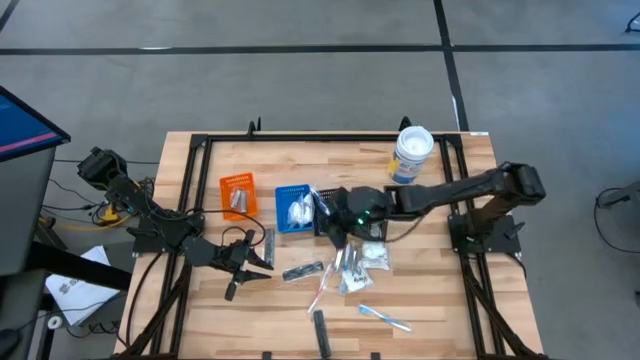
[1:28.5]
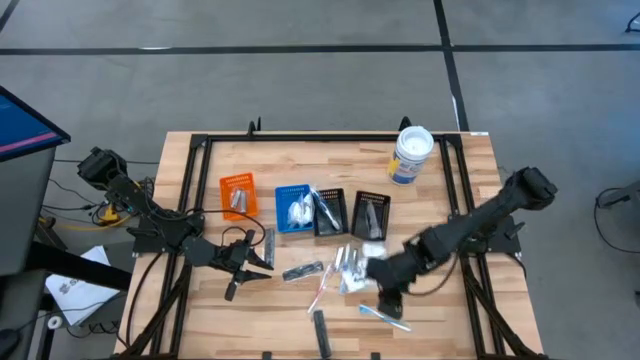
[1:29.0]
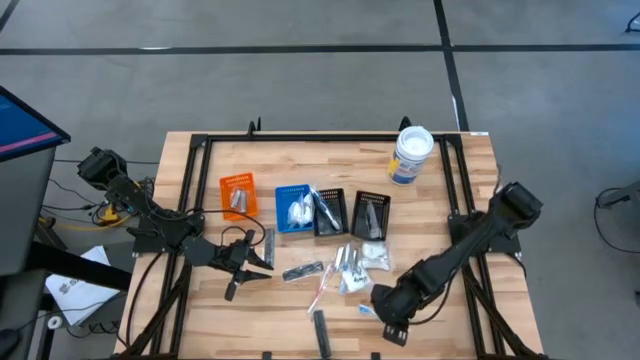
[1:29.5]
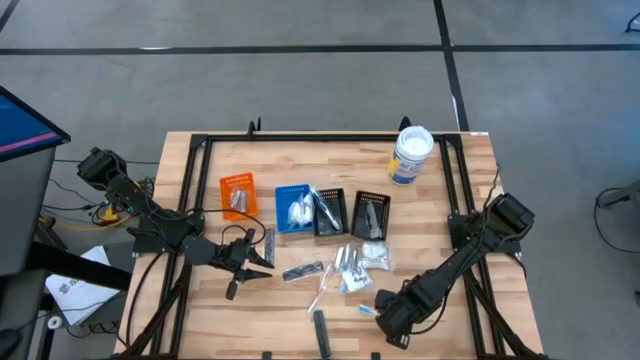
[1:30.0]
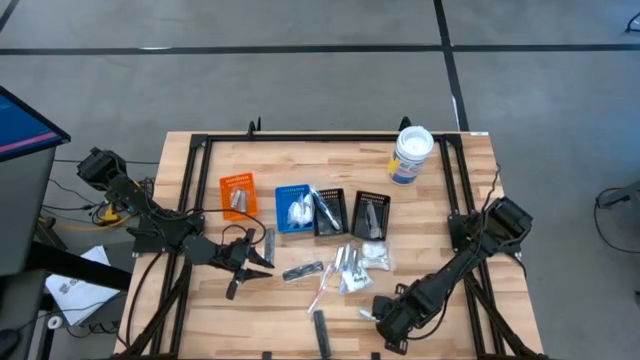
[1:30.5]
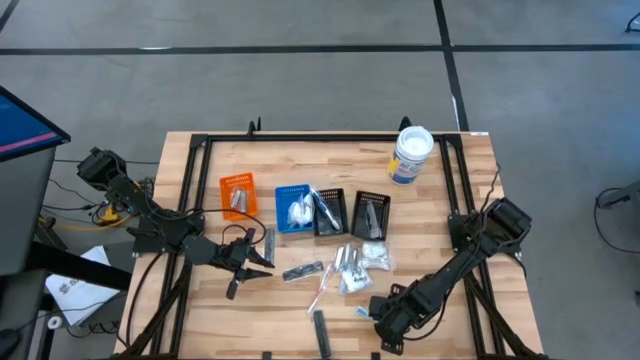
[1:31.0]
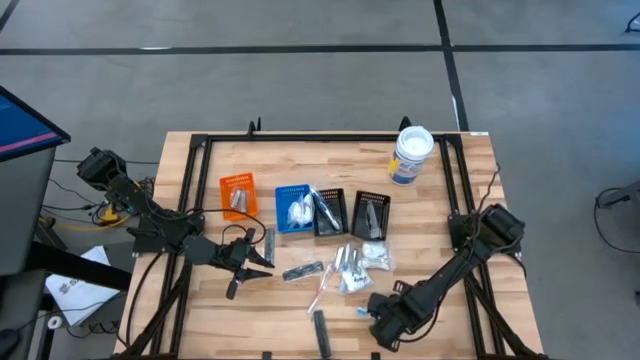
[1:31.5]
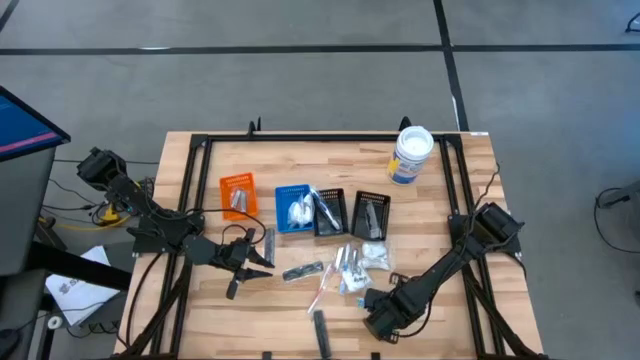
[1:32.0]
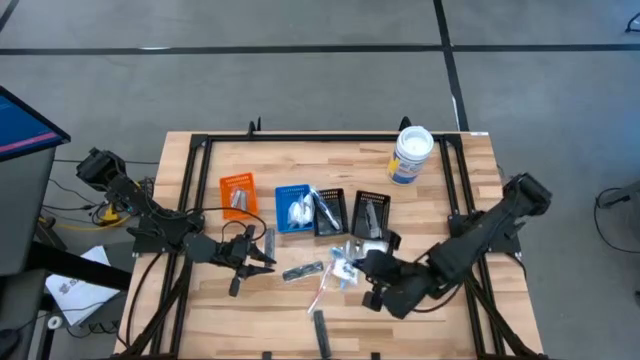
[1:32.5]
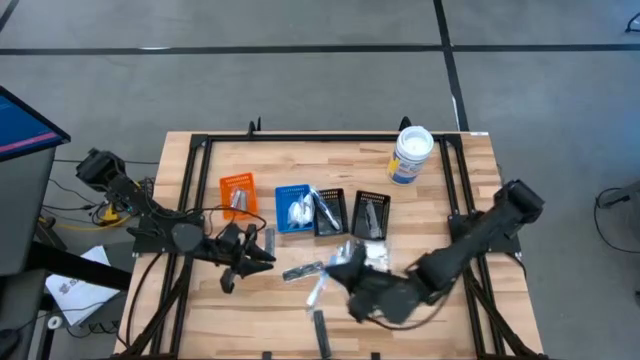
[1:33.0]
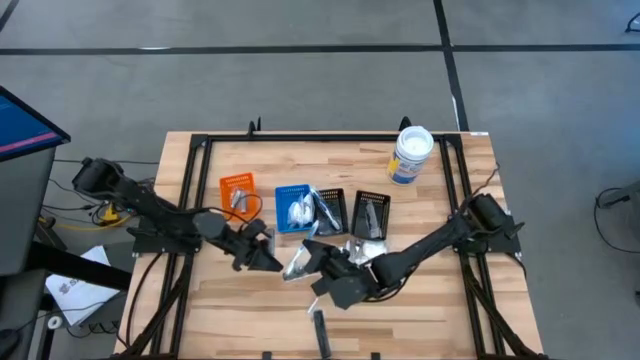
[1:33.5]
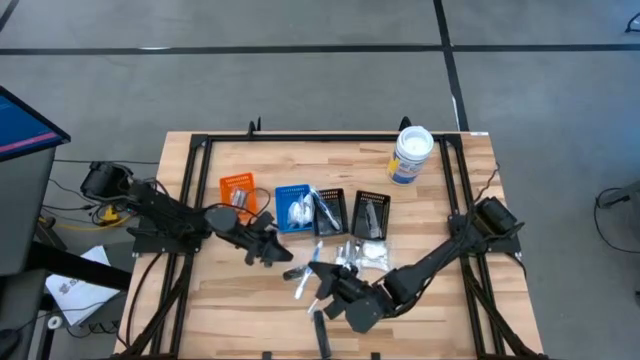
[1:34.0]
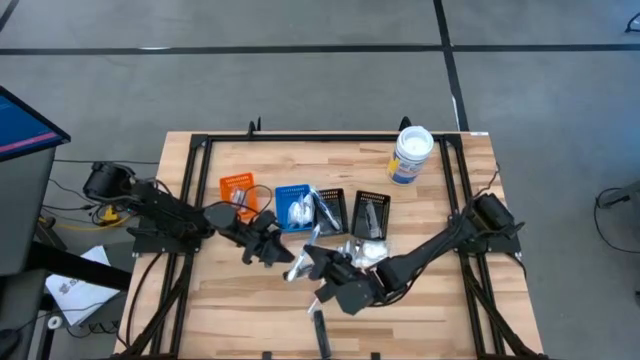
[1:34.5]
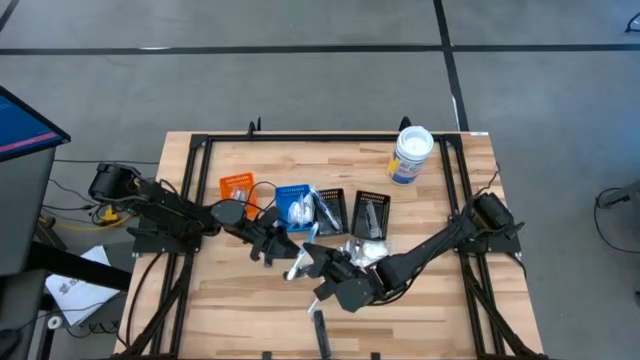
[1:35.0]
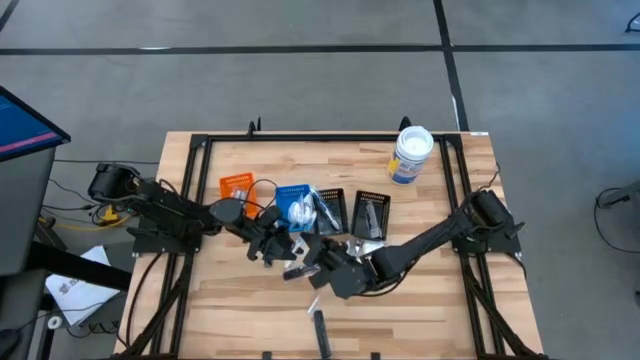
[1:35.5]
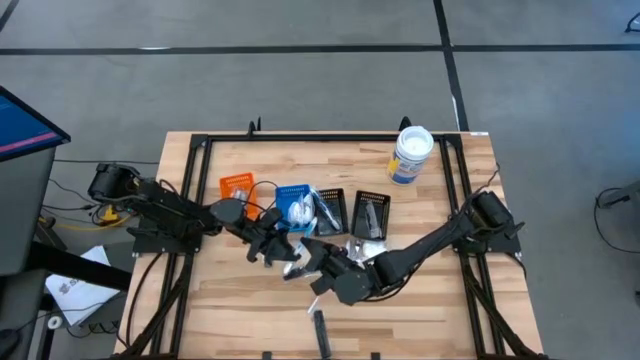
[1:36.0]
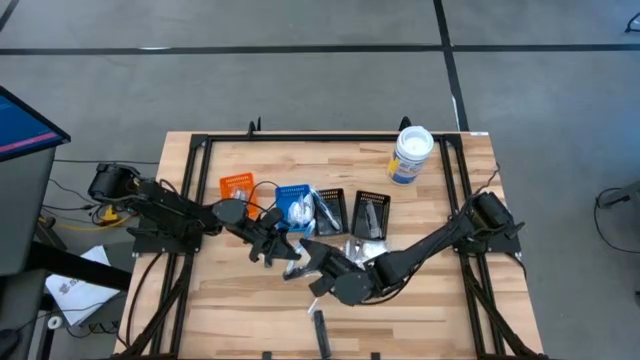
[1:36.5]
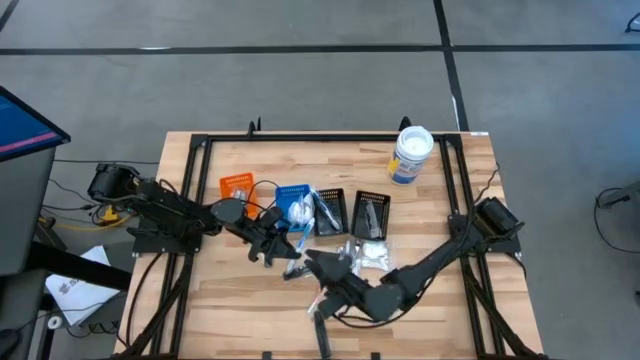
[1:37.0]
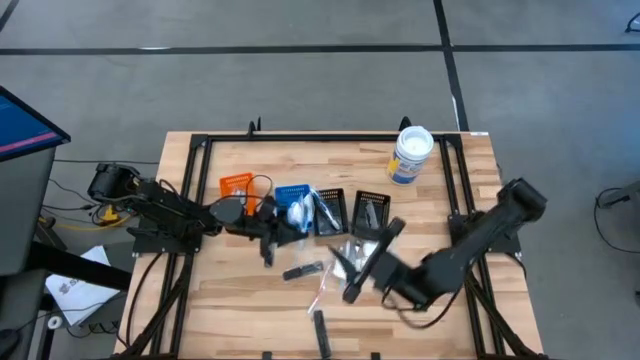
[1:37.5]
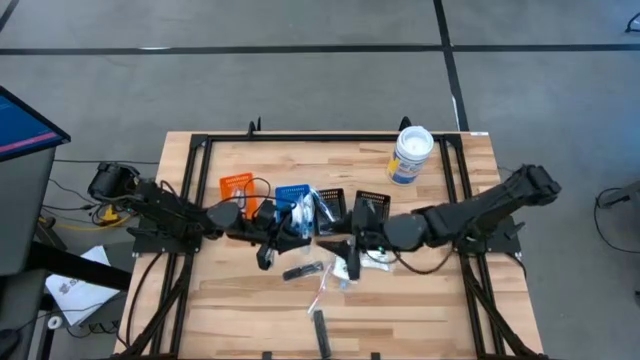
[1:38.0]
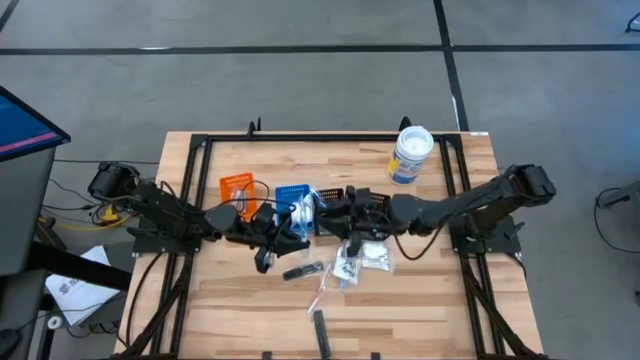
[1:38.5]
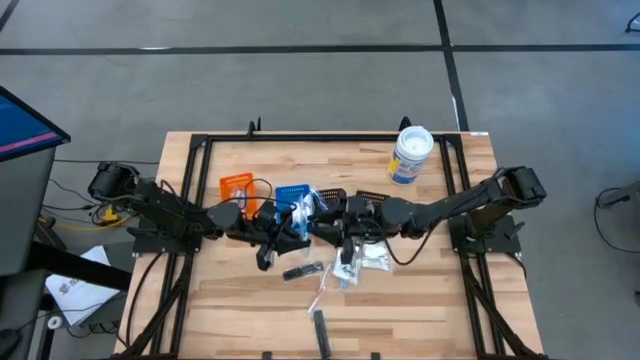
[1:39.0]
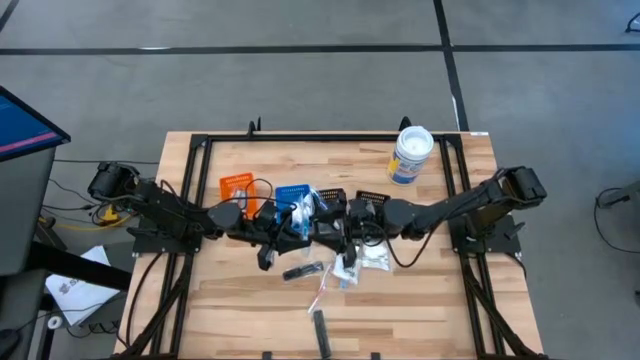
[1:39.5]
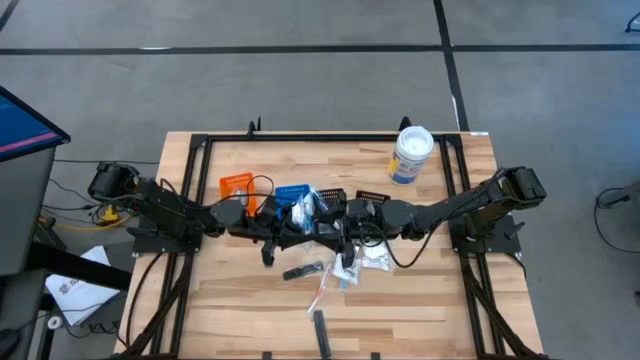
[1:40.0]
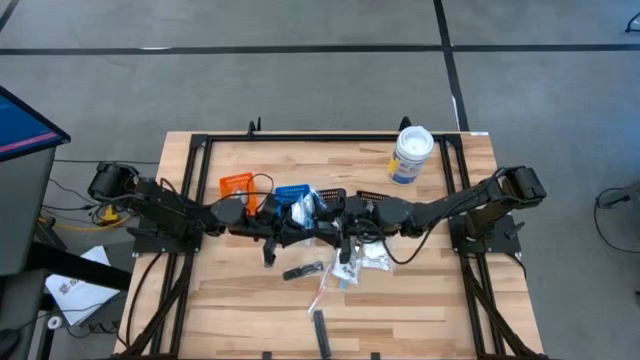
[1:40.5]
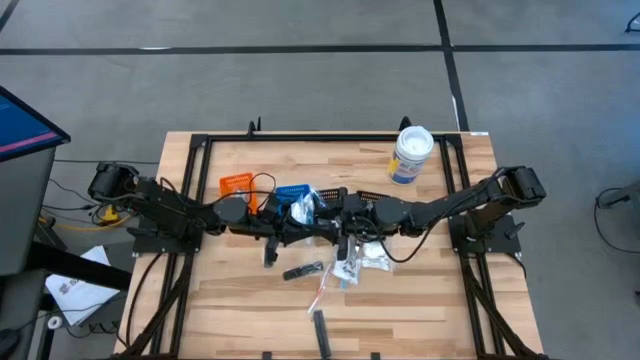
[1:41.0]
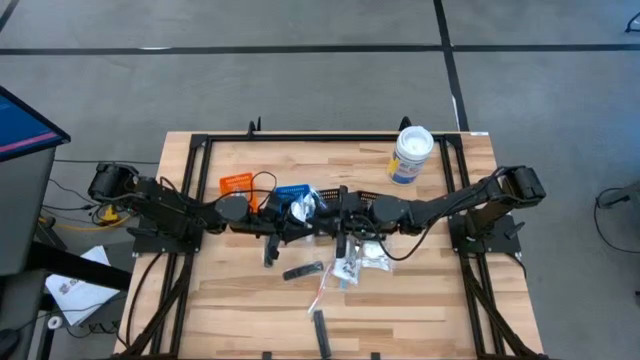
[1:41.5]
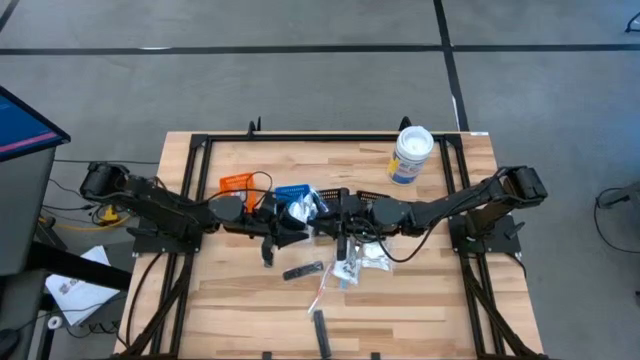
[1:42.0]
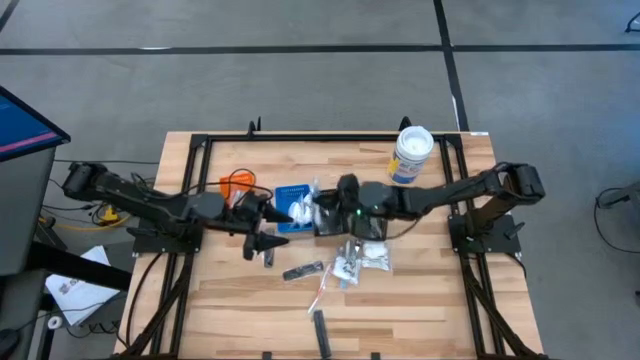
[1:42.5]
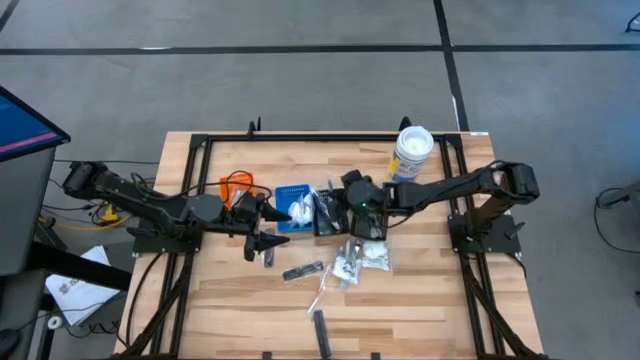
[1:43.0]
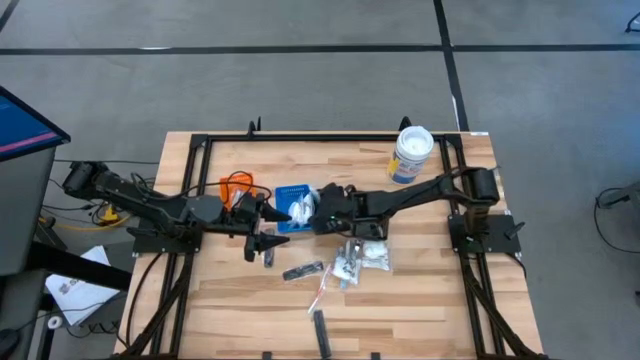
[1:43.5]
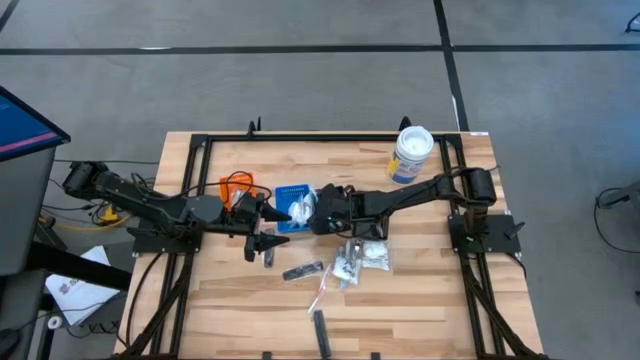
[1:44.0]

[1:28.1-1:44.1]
Task: Pick & Place Travel size toiletries
Put the blue toothbrush into the left black bin

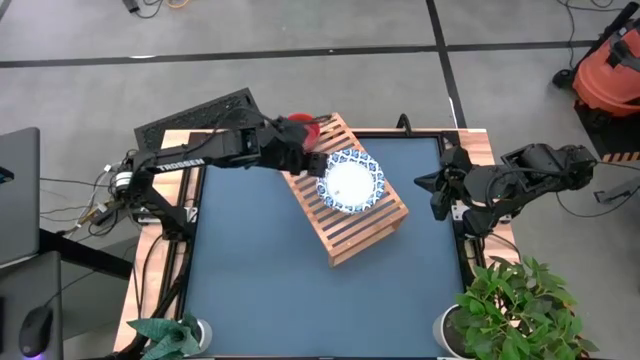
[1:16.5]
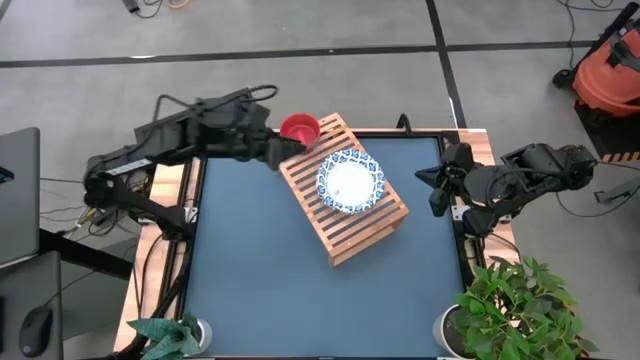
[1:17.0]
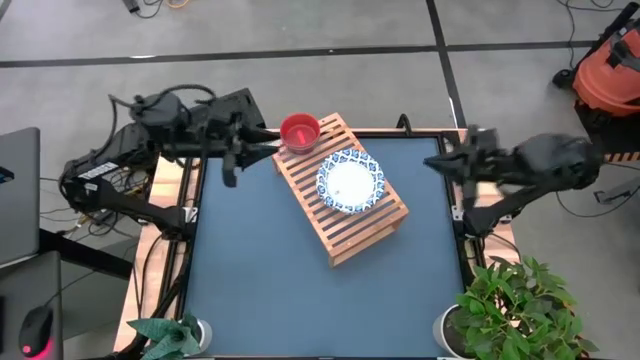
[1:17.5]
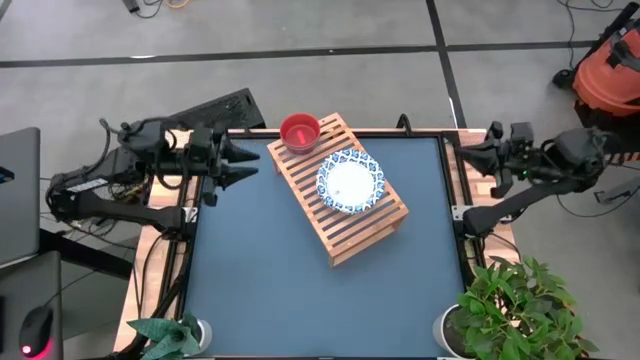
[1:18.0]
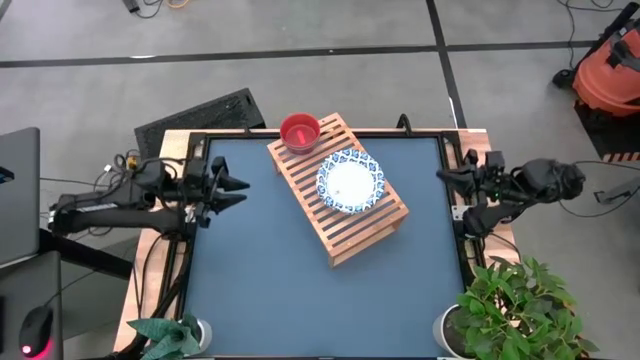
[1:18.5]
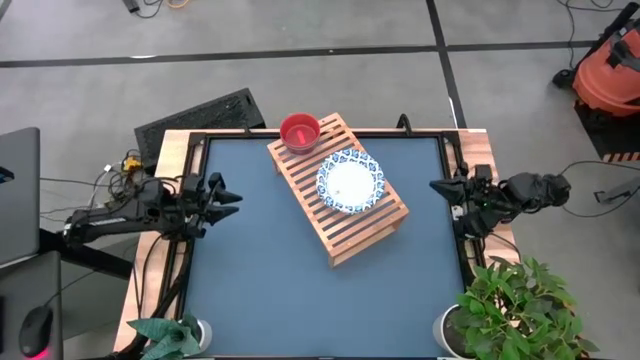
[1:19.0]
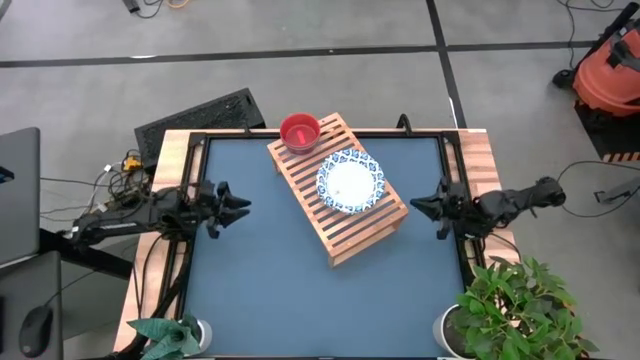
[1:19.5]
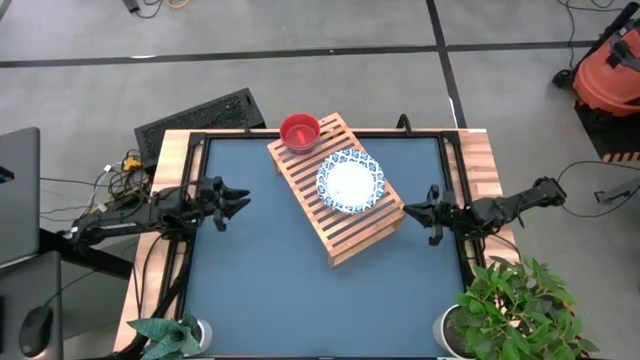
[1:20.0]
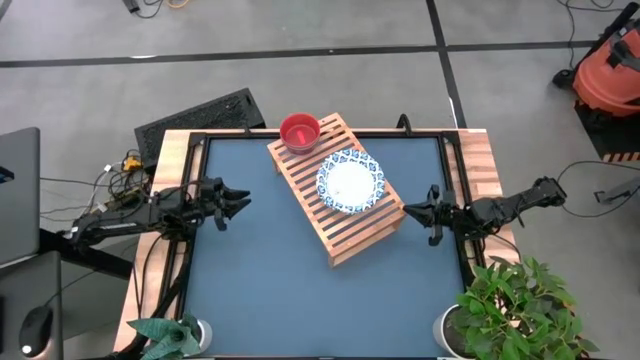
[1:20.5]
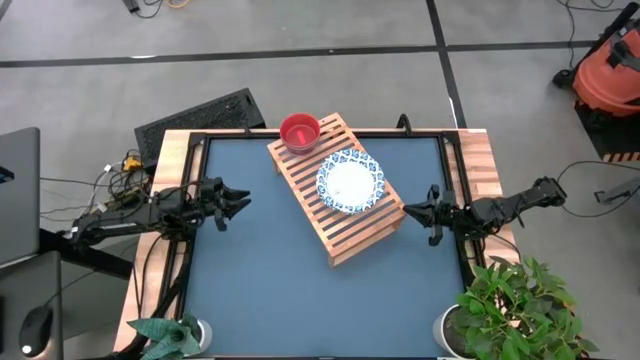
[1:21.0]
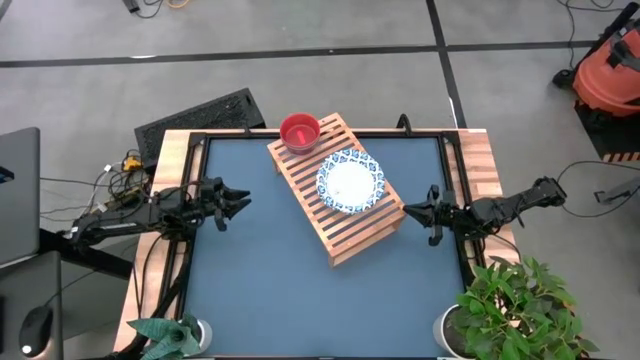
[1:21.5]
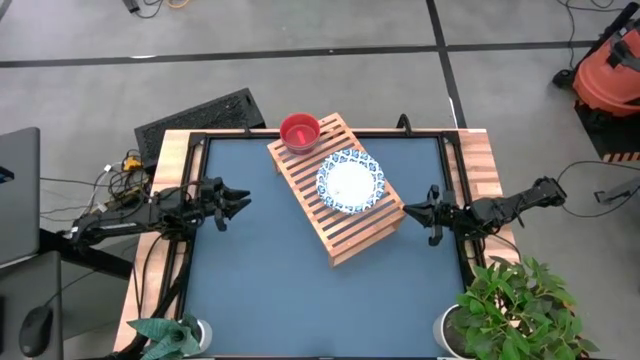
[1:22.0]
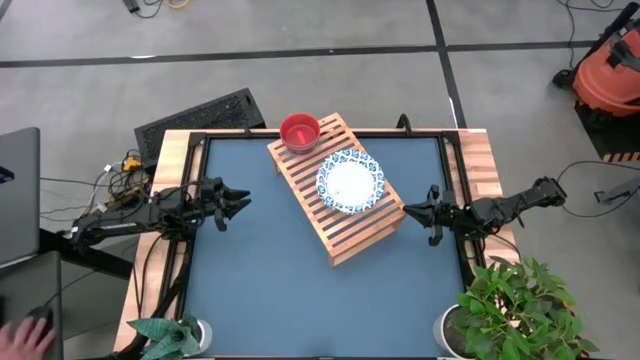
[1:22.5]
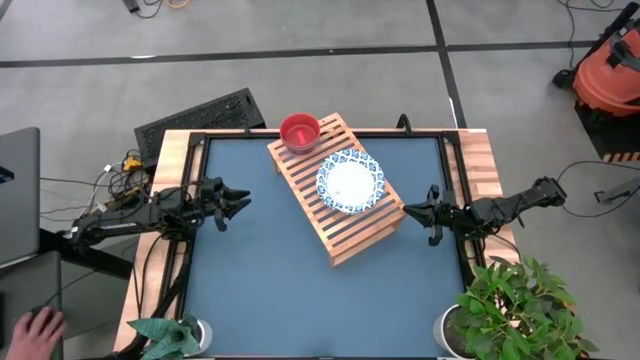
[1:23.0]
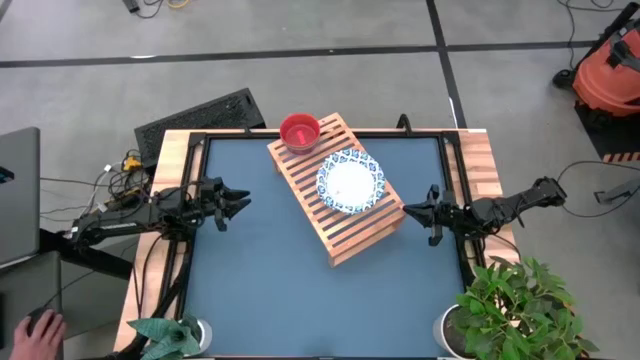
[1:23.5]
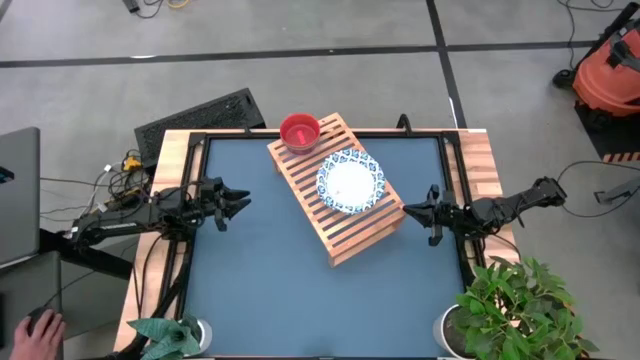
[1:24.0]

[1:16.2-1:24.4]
Task: Place and stack bowls onto a shelf
Return to Home Position
